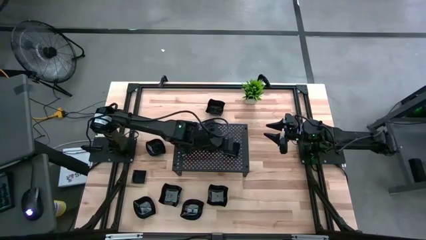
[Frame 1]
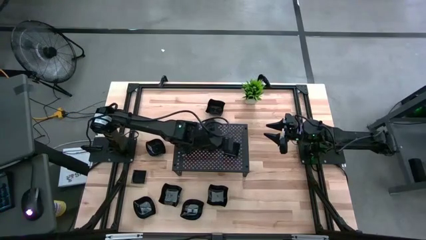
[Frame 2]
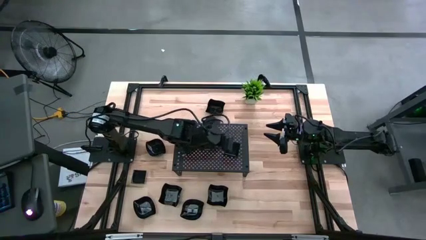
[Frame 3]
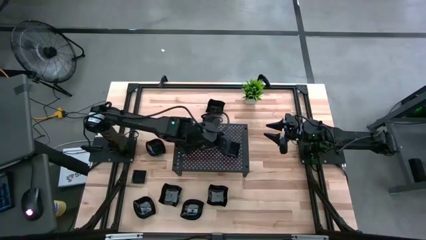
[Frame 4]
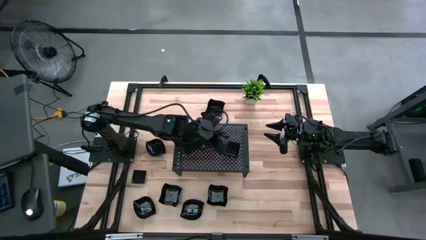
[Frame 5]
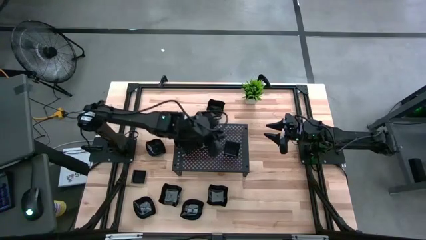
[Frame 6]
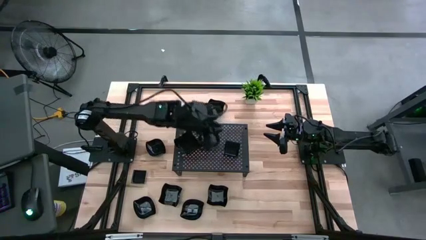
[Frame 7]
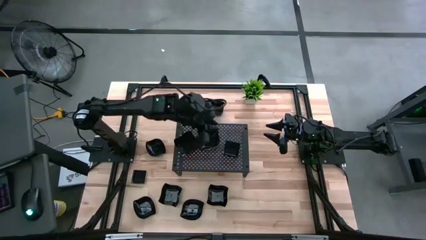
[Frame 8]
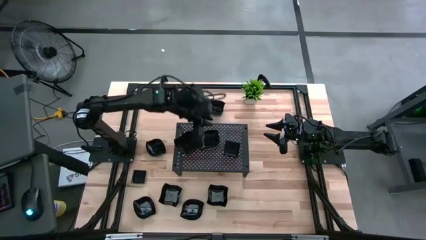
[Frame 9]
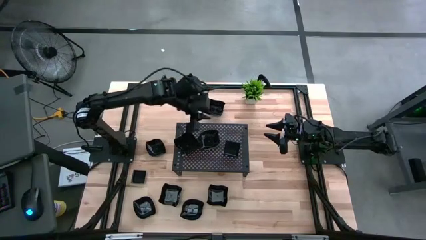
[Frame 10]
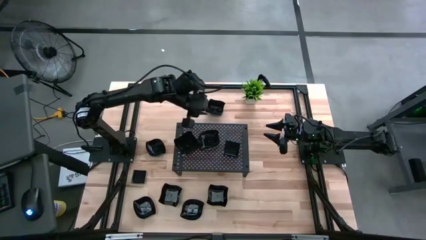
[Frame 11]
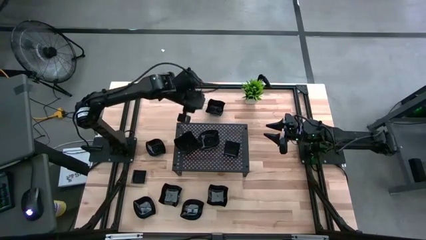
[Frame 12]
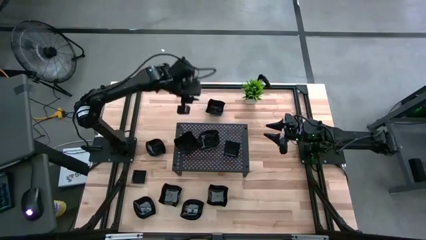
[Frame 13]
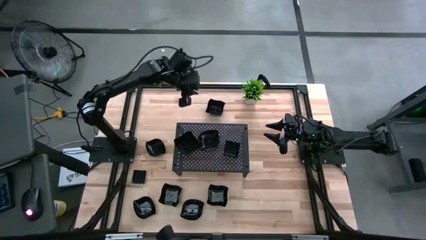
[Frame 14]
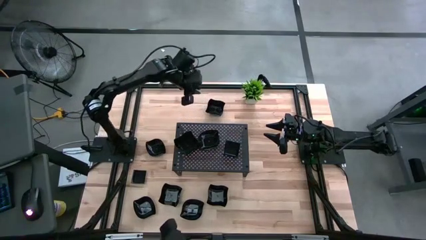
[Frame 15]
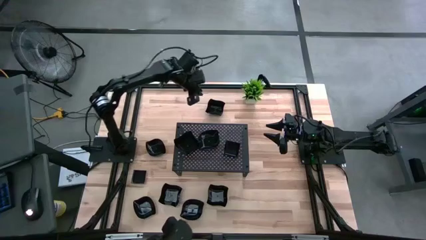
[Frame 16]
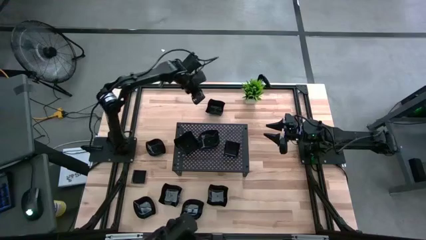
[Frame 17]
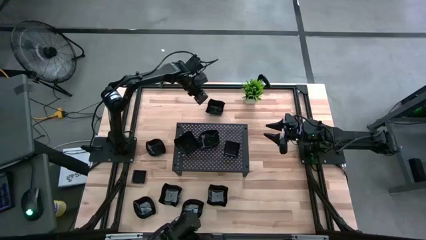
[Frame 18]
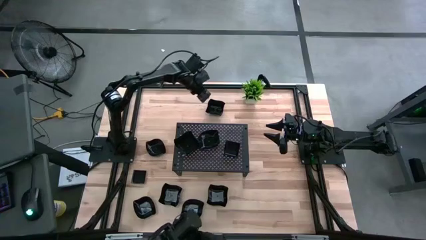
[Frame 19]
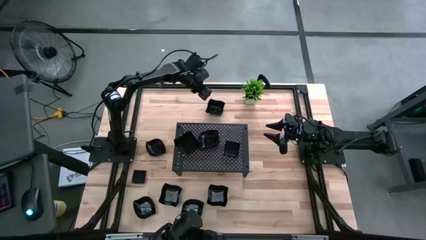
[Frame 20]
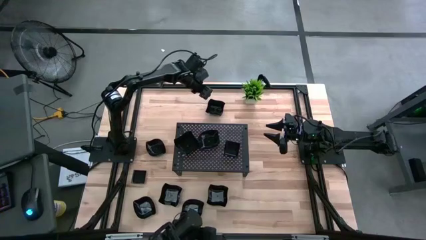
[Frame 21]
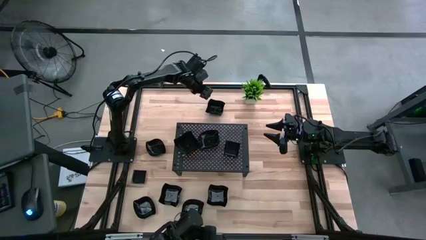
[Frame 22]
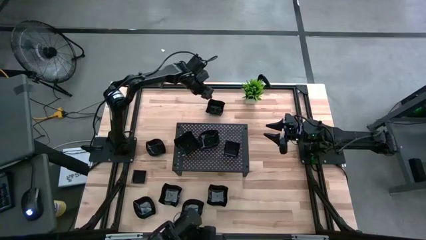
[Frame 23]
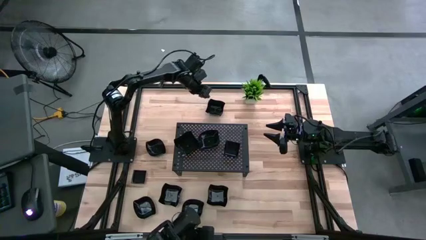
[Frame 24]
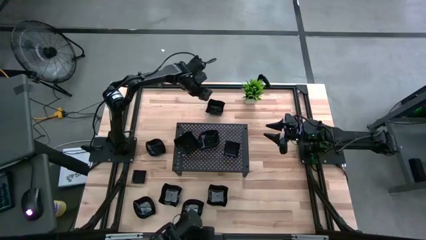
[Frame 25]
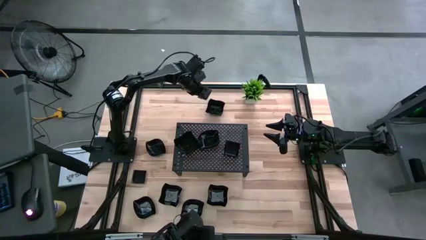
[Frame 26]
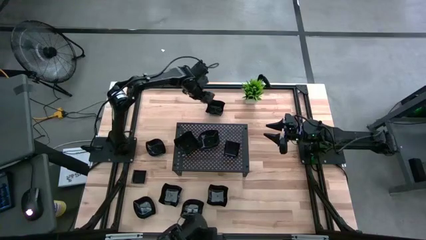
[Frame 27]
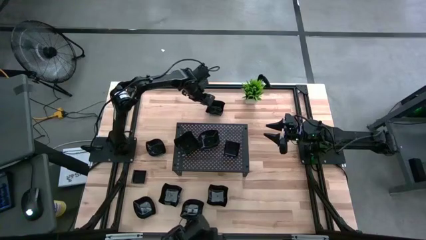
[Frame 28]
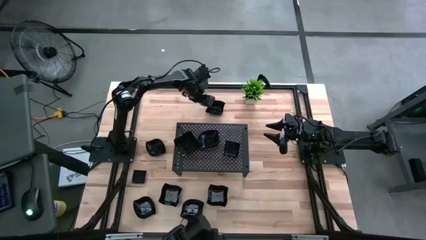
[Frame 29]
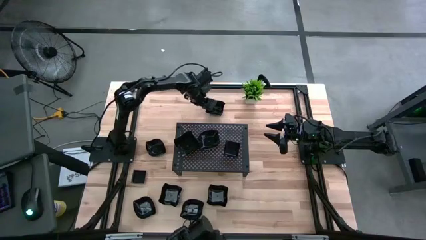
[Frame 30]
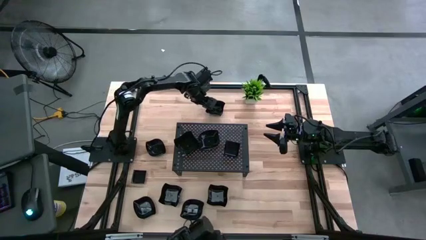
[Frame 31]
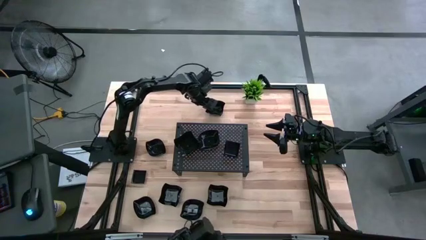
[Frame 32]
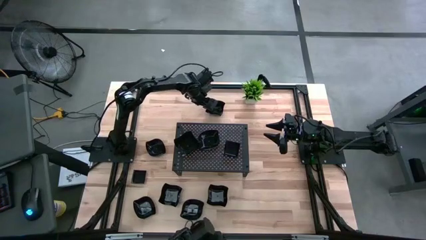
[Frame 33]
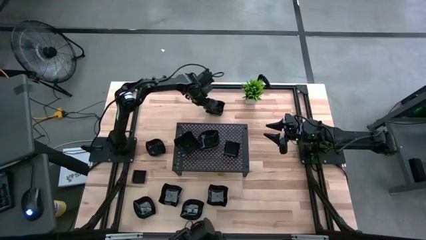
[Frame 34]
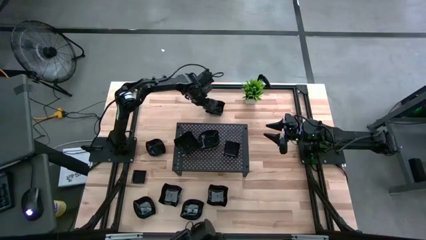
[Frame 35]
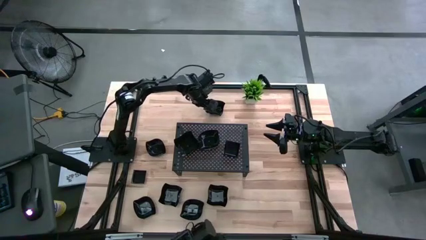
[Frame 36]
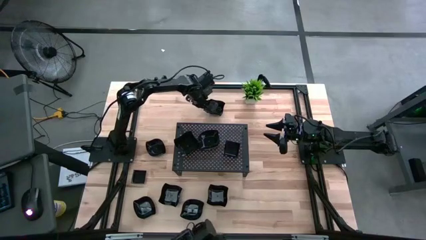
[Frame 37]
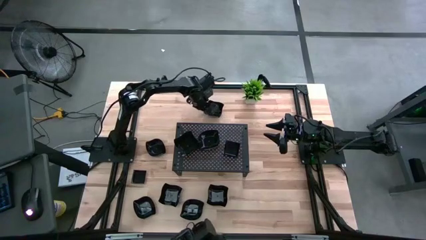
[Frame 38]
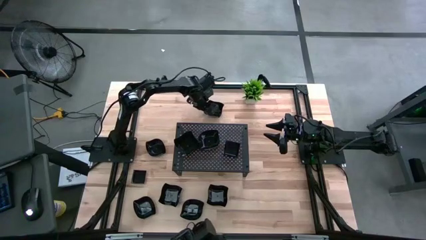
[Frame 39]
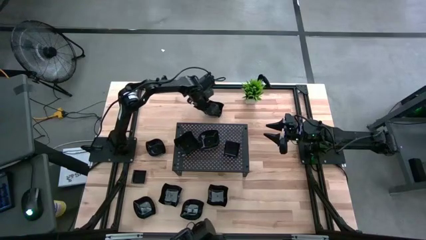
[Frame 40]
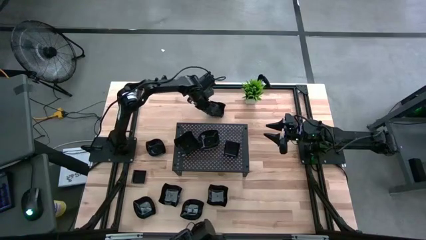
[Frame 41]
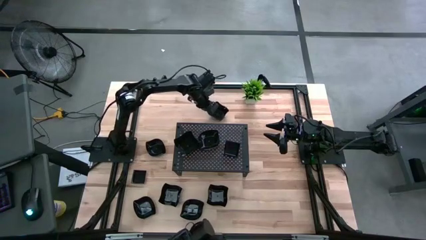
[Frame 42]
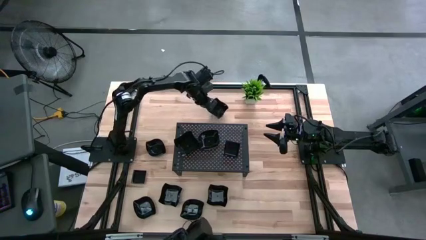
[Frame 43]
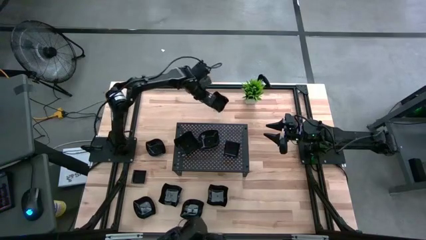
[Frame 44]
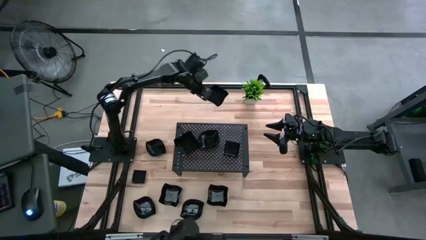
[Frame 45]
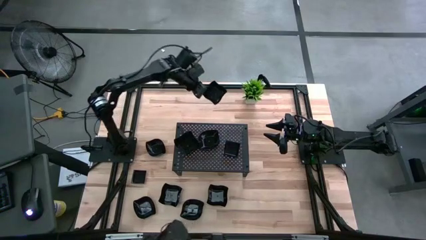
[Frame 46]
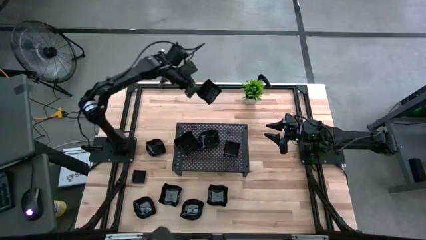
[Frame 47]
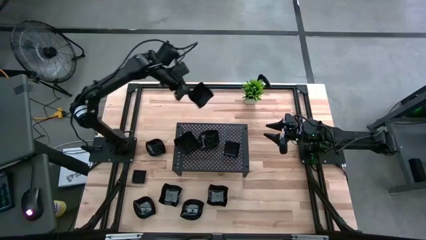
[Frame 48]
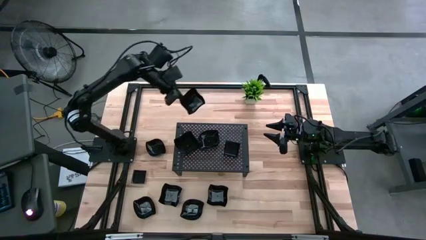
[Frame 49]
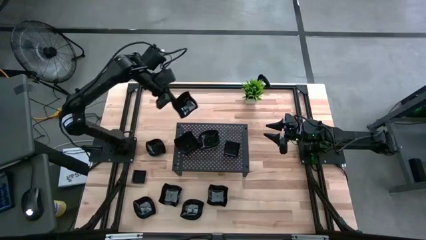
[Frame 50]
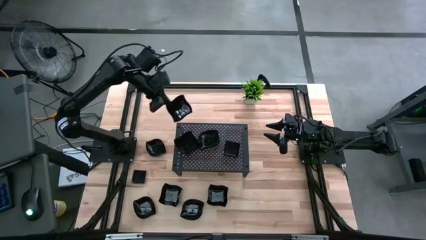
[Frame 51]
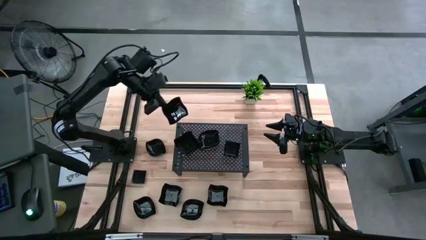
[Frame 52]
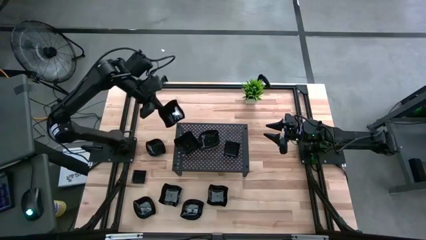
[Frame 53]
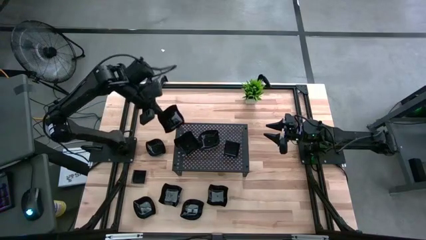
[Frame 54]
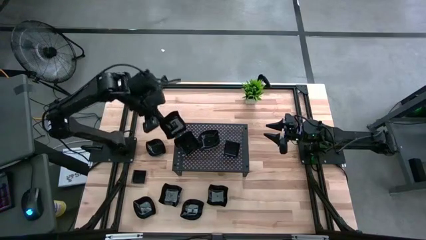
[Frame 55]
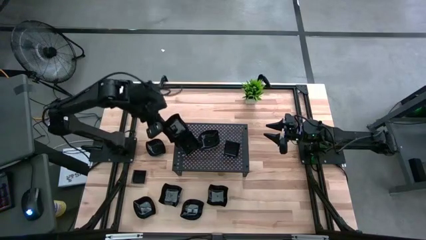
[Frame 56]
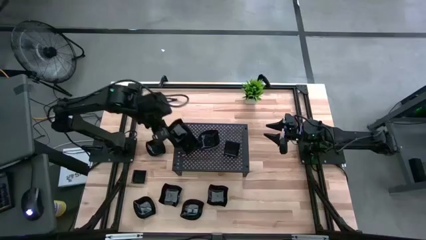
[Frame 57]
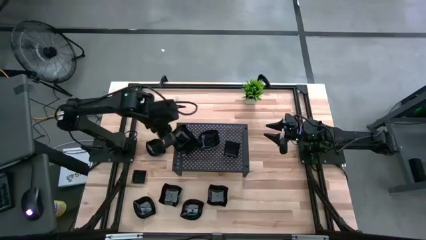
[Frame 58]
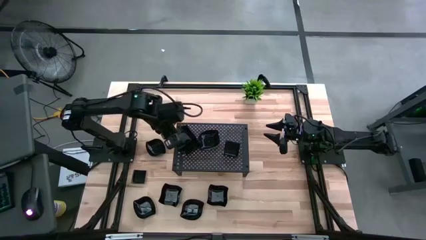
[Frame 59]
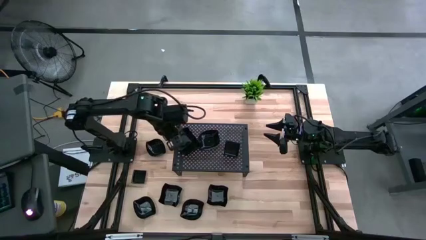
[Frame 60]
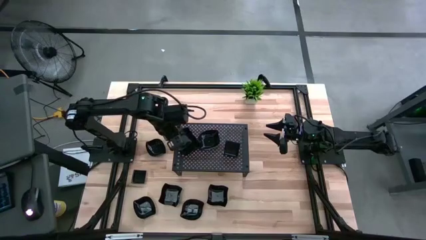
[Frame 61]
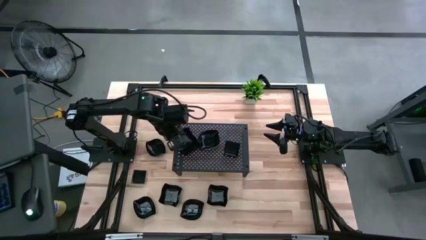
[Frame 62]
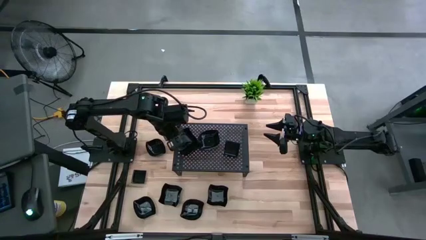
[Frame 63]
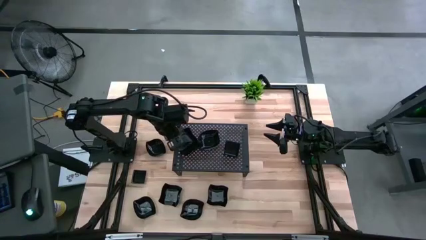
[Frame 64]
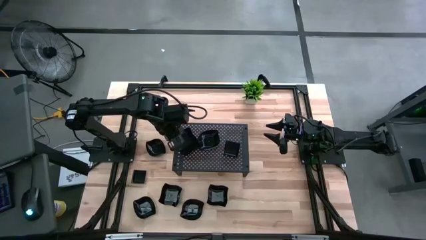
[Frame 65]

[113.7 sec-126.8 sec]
Task: Pick & Place Mini shaped plates
Stack the top right distorted square plate on top of the distorted square plate on the shelf
